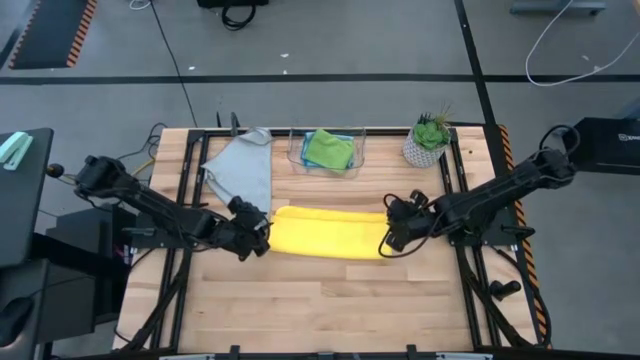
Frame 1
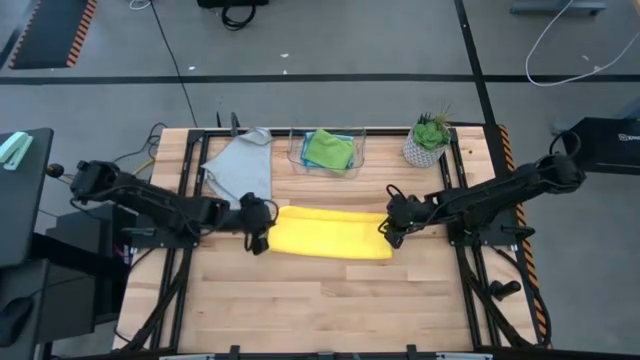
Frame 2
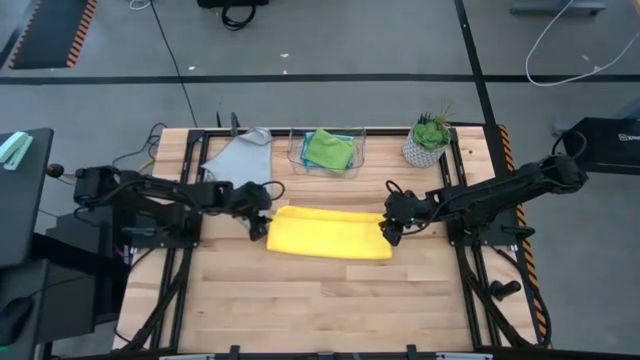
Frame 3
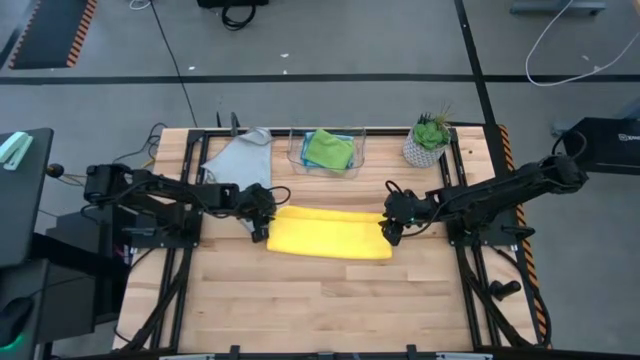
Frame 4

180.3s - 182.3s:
Task: Fold microfiber towels
Fold the yellow microfiber towel

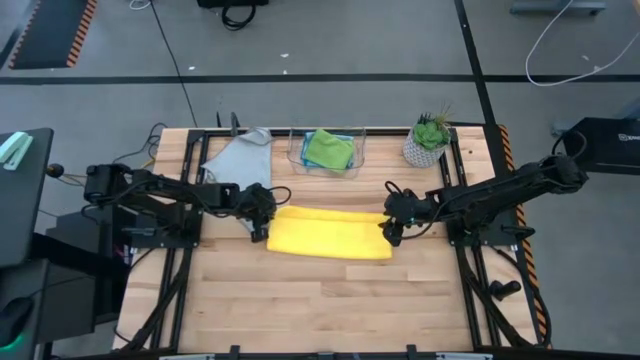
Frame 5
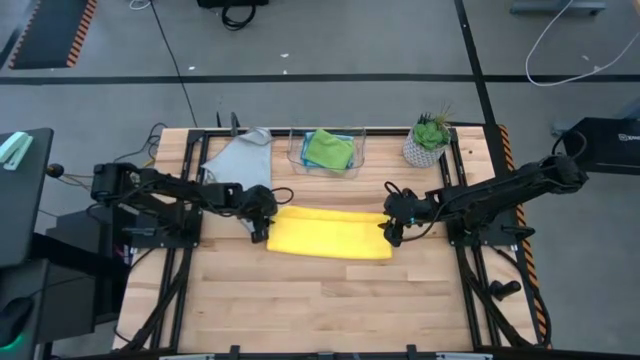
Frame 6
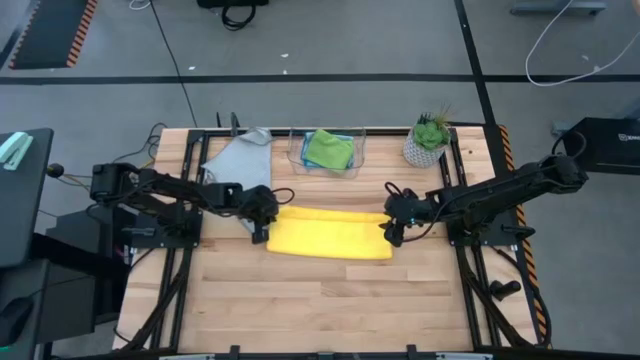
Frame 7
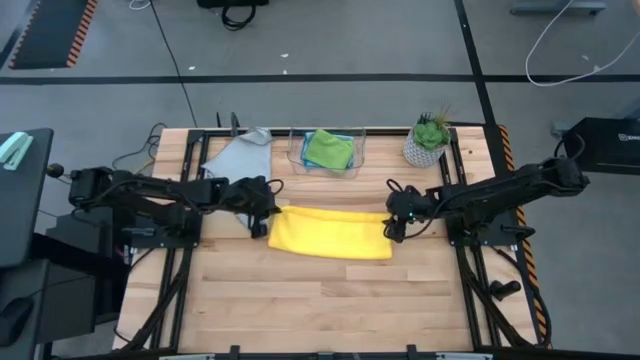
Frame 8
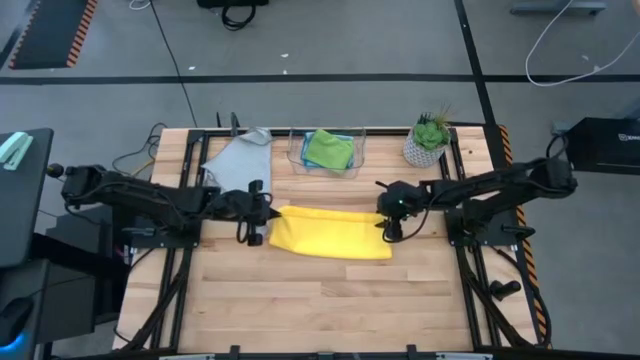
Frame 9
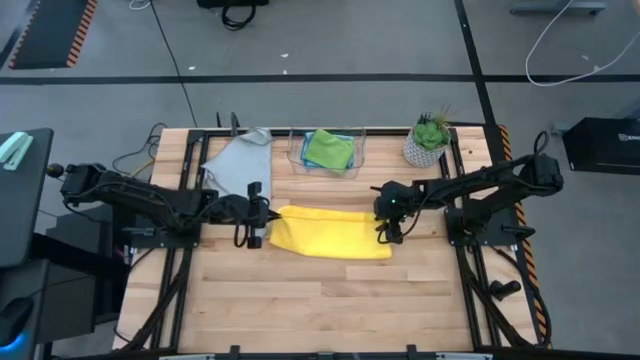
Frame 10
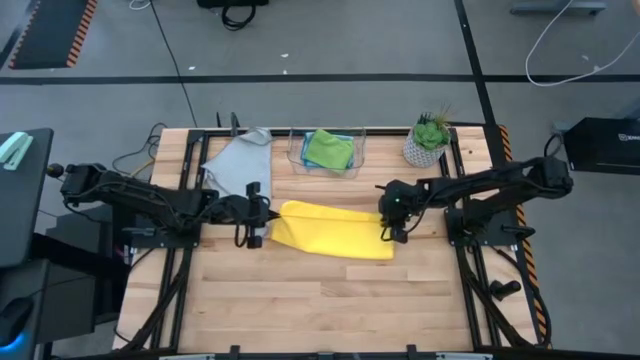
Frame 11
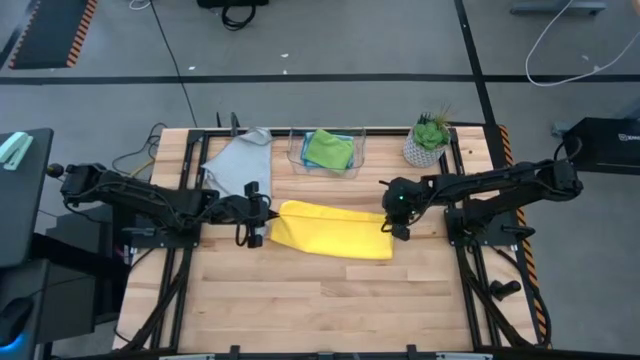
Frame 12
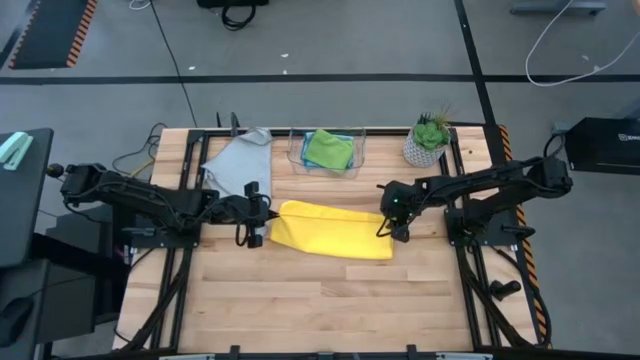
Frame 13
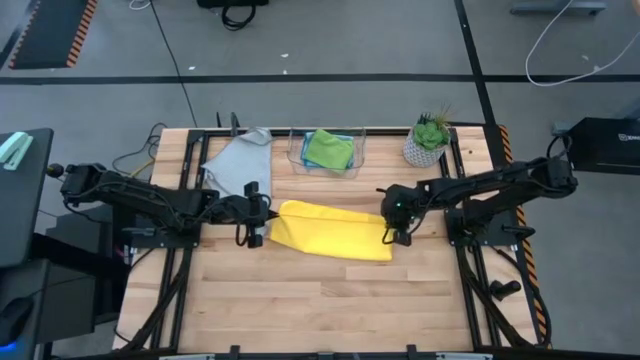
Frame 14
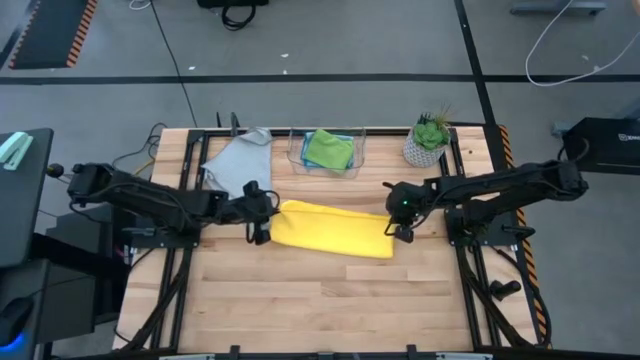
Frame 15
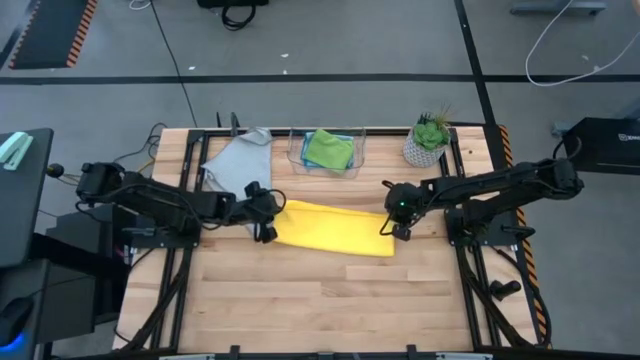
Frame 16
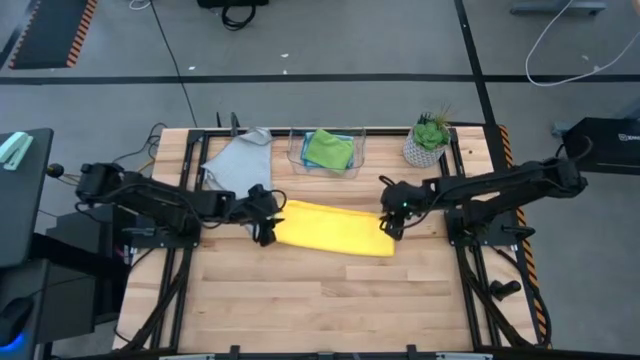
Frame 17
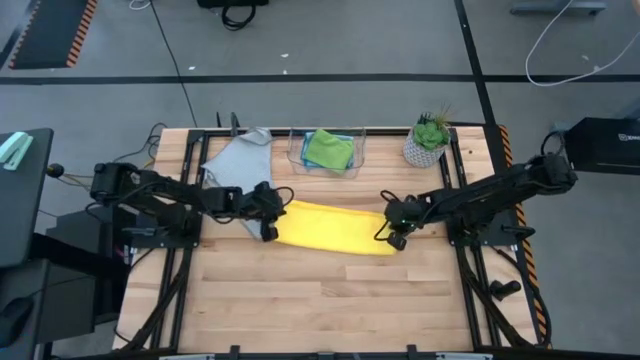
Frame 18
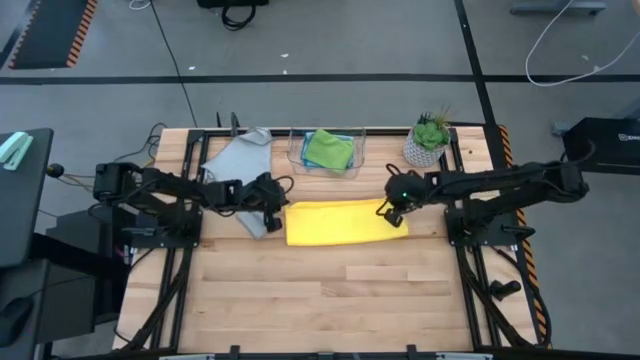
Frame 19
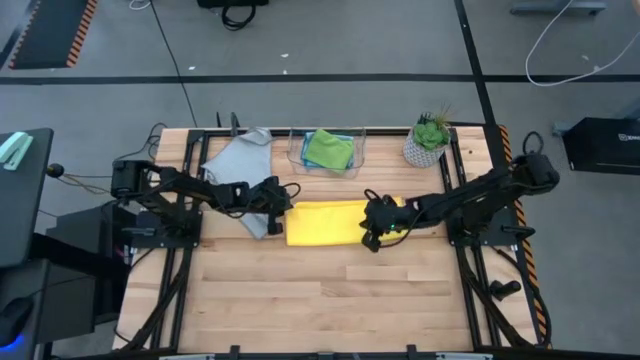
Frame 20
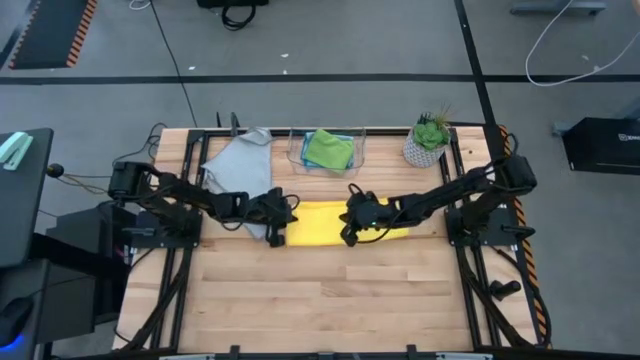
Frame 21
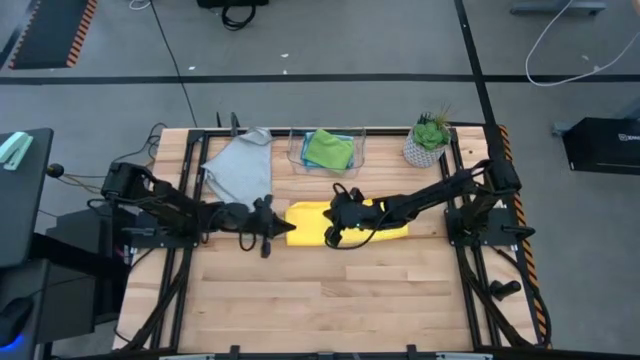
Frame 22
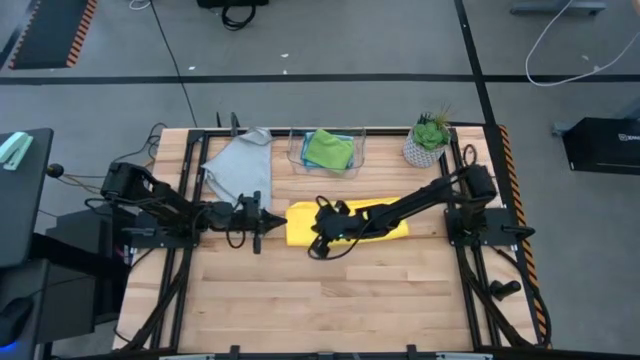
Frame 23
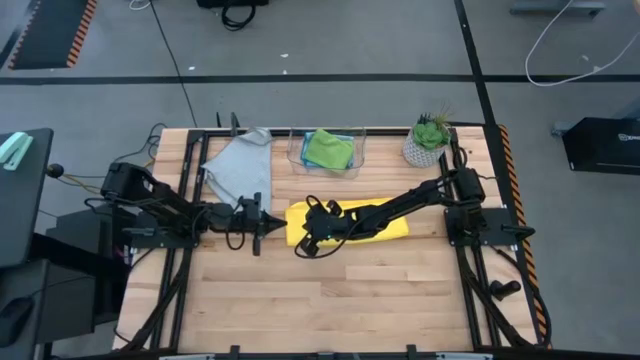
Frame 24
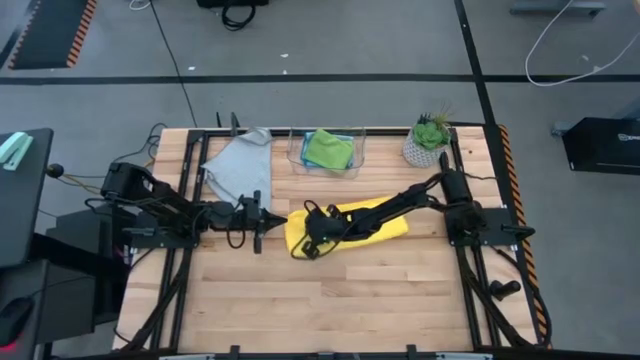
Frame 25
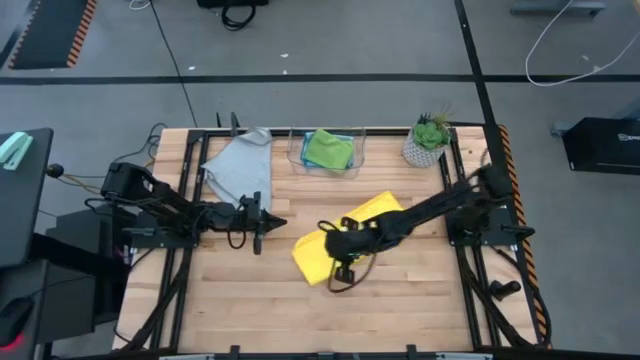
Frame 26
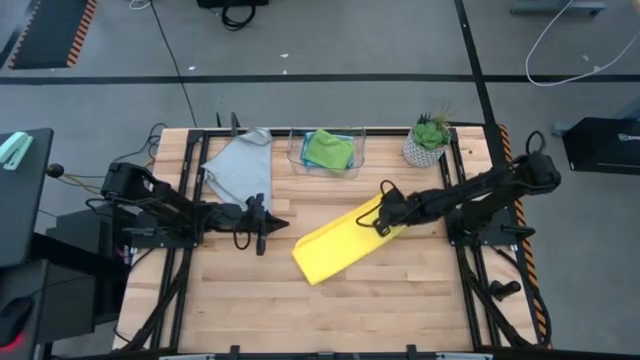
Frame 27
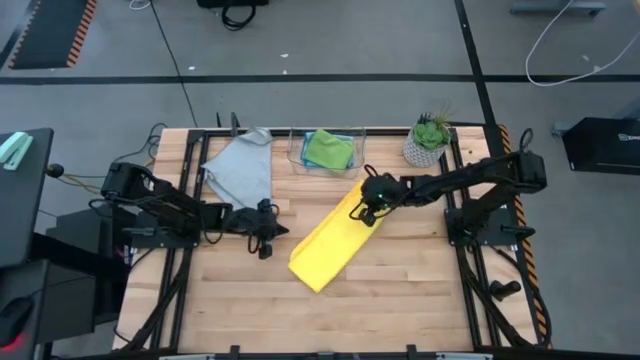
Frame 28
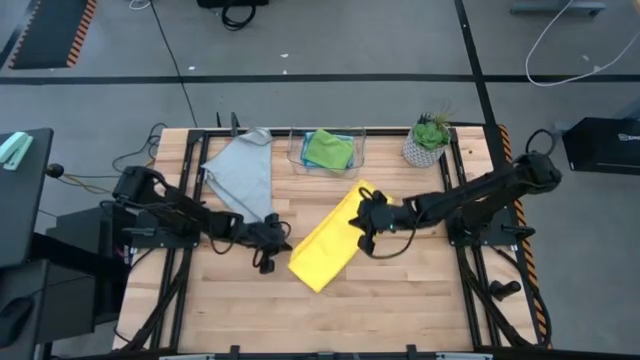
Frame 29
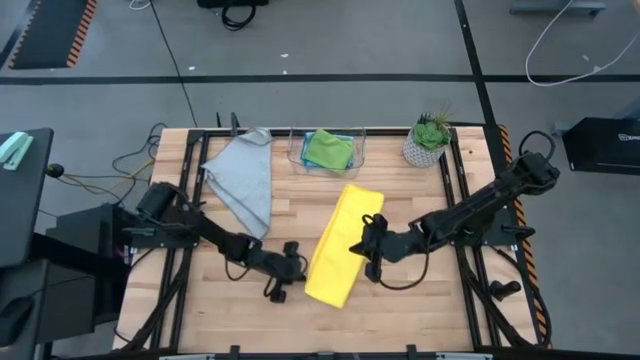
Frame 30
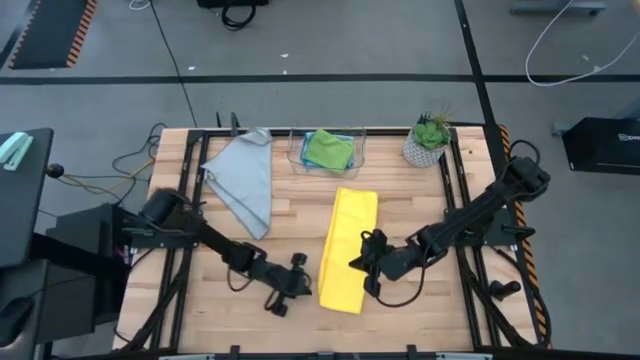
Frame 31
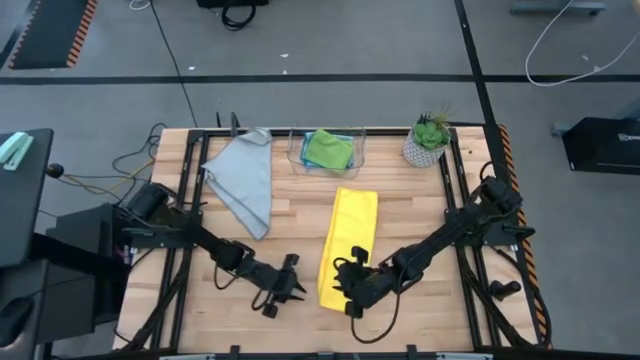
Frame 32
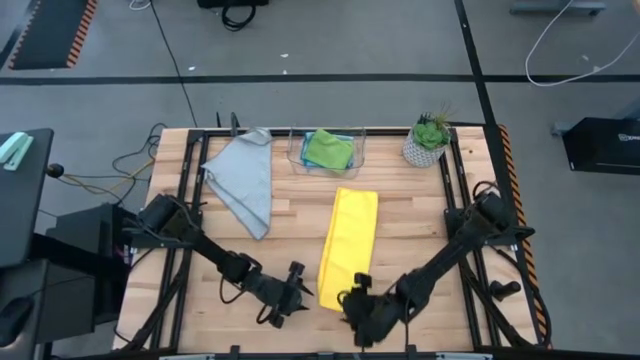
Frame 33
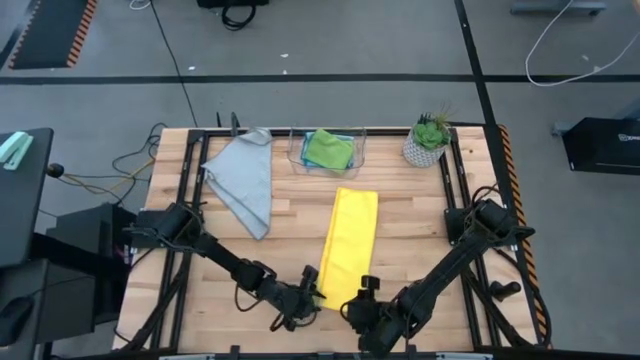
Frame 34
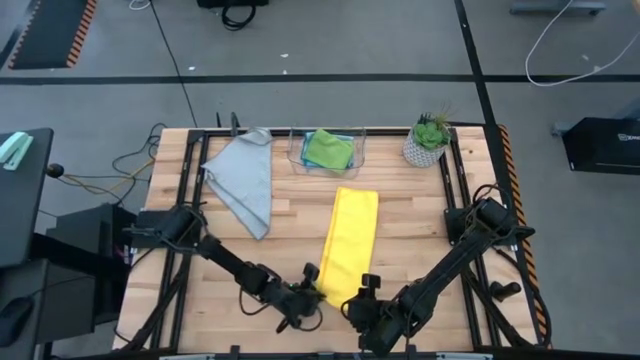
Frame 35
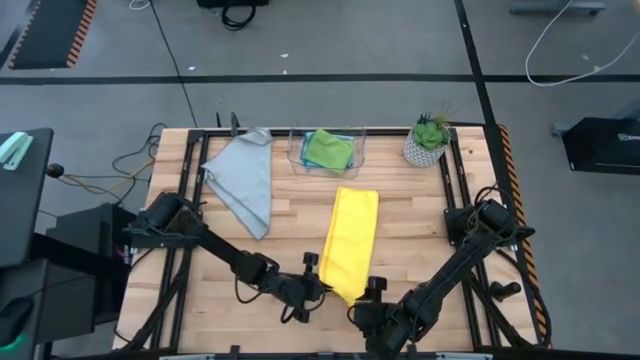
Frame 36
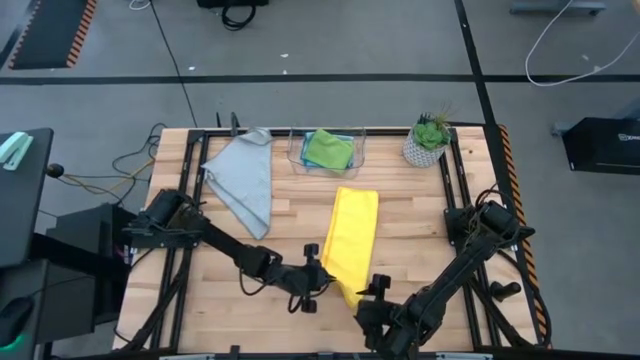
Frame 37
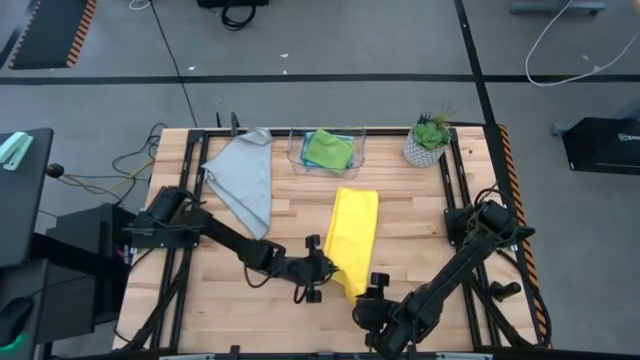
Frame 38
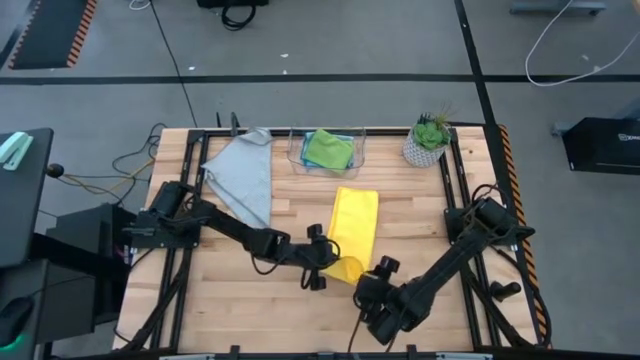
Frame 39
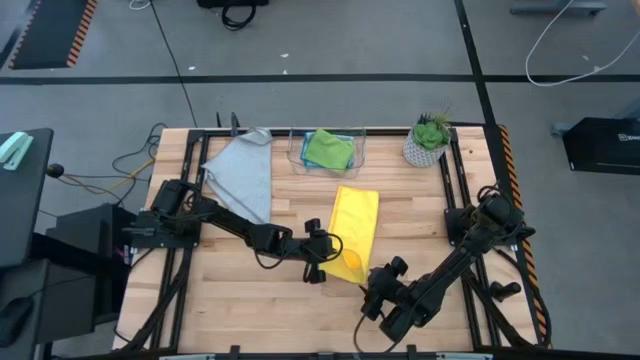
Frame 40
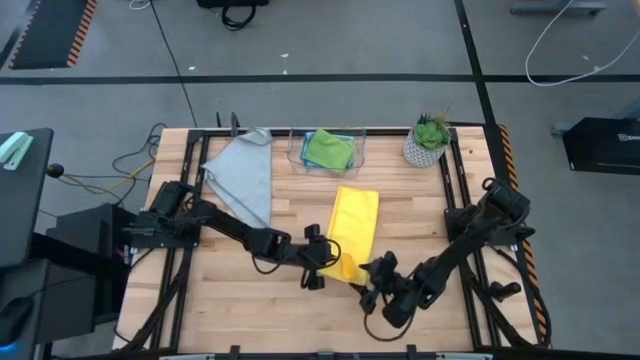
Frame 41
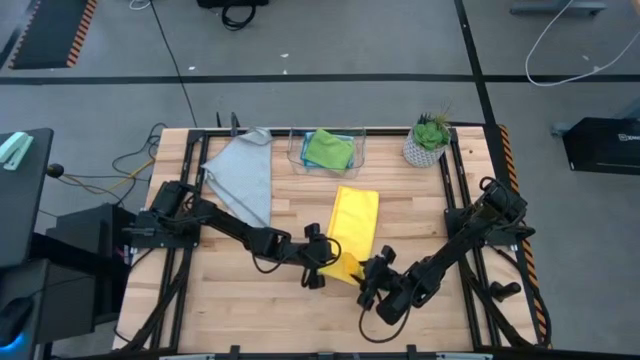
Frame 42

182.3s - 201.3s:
Fold the yellow microfiber towel
